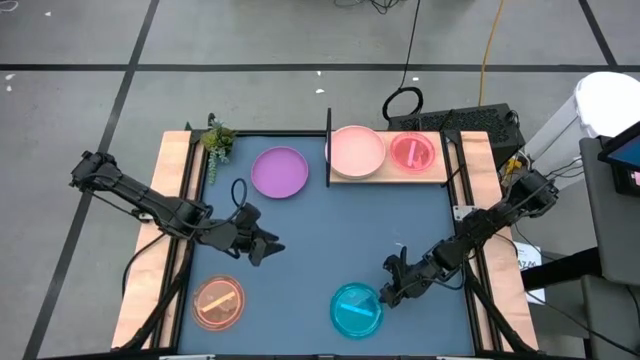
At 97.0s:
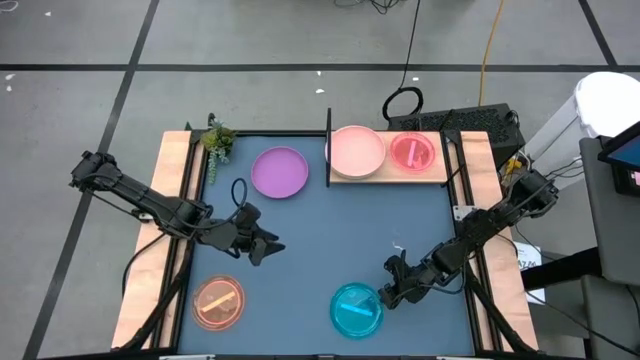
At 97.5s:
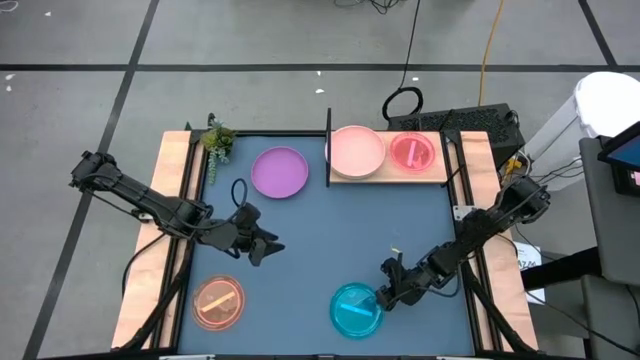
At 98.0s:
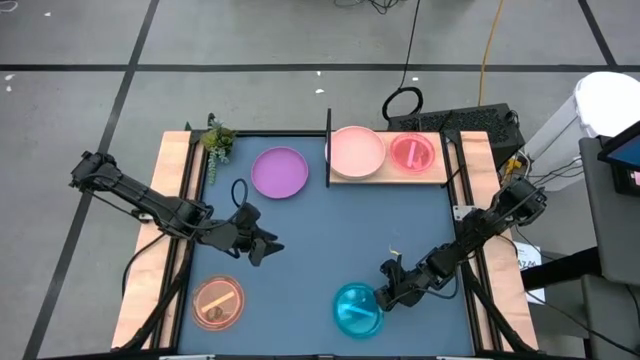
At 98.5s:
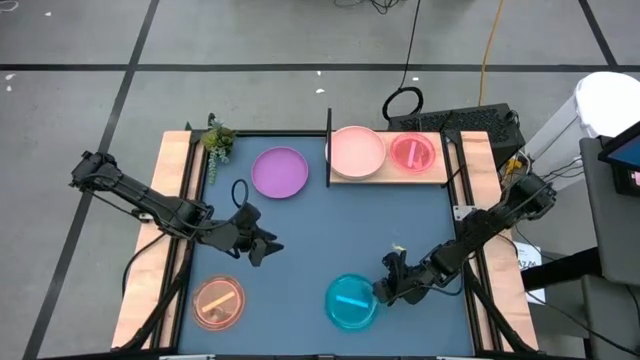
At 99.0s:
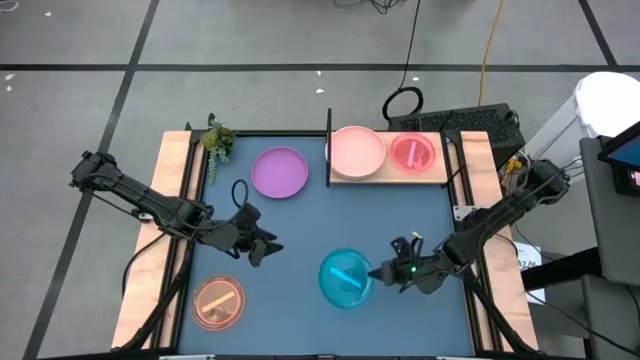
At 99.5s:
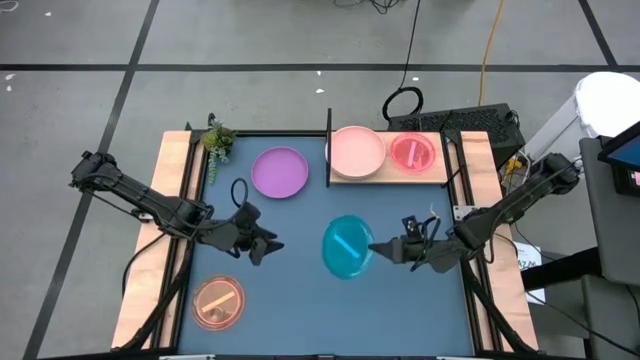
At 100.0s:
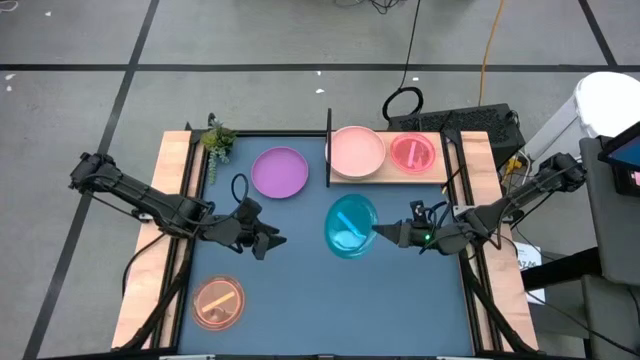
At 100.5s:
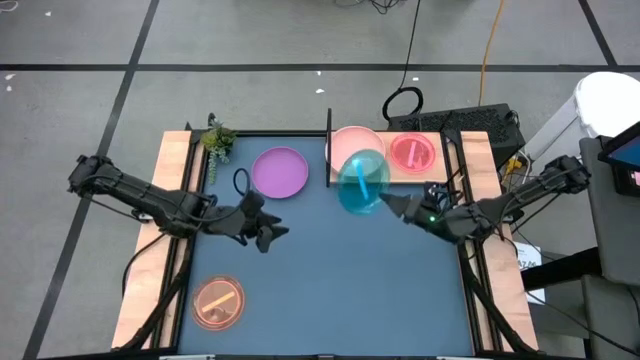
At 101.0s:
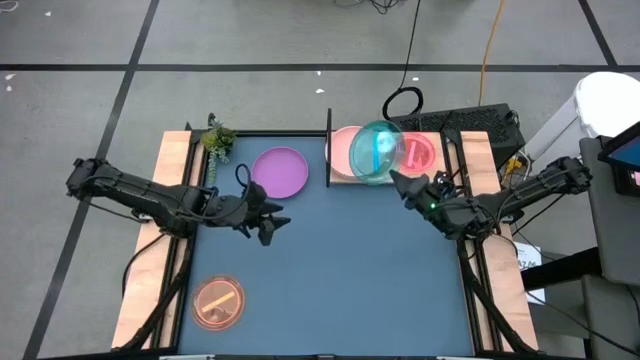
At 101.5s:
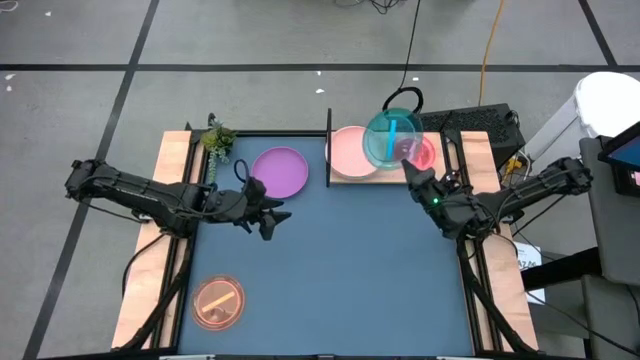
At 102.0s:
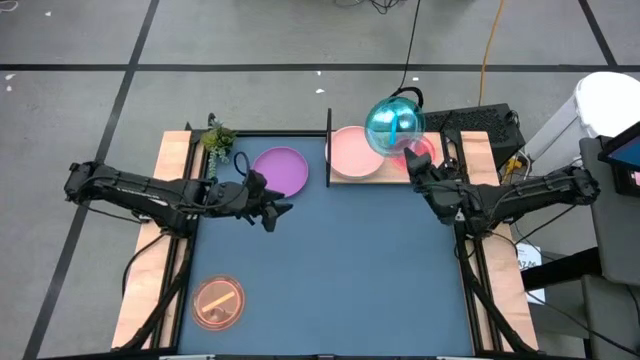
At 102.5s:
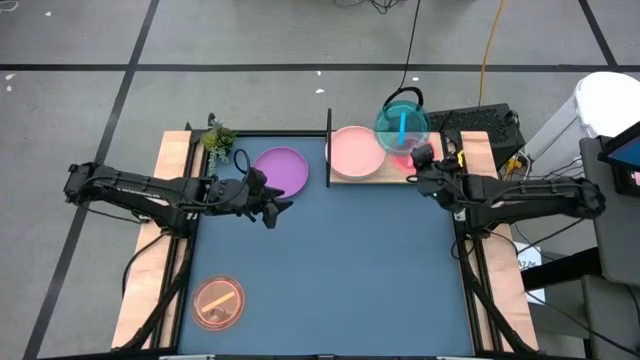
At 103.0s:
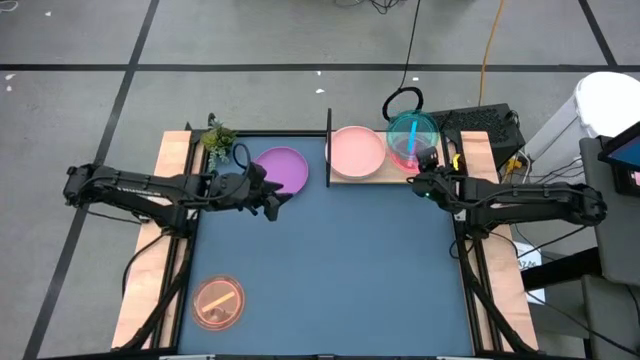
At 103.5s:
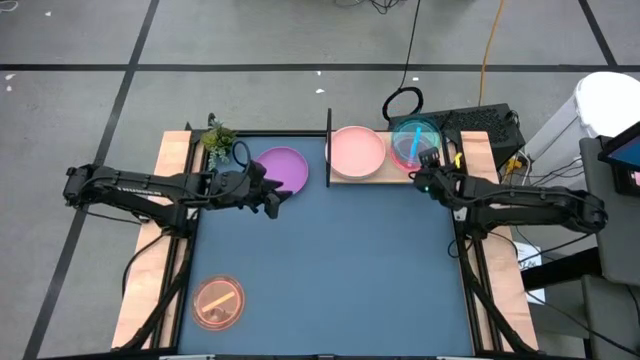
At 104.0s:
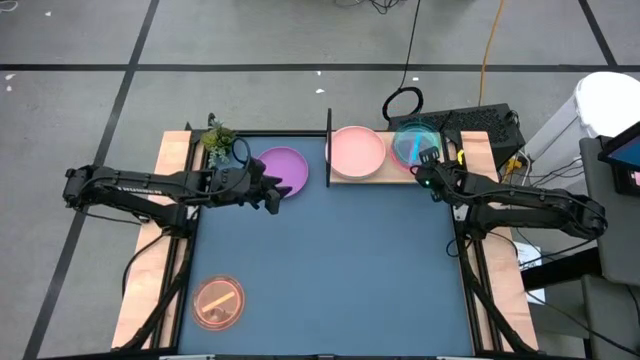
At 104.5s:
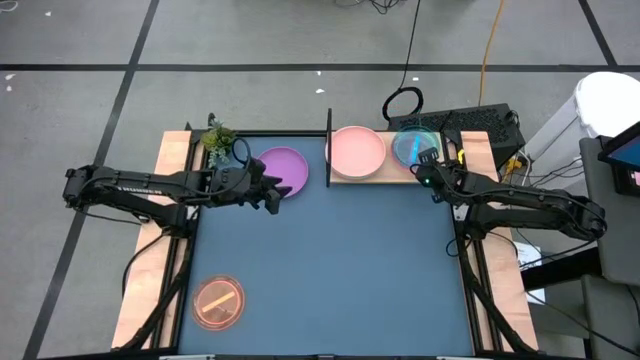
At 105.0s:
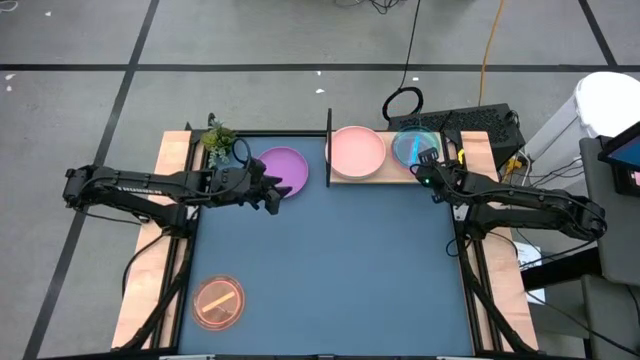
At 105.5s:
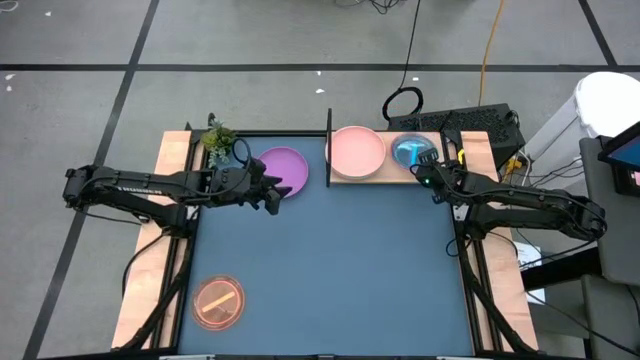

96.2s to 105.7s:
Task: Place and stack plates onto a shelf
Stack the blue plate on top of the pink plate on the shelf

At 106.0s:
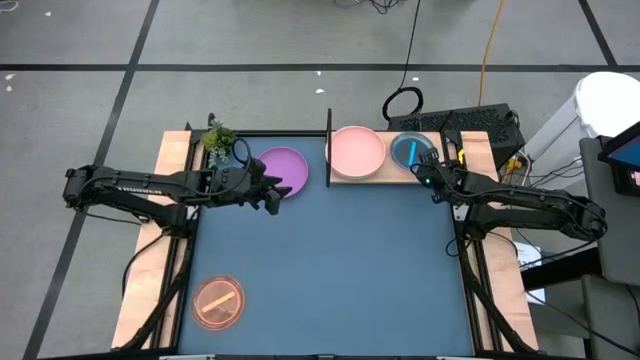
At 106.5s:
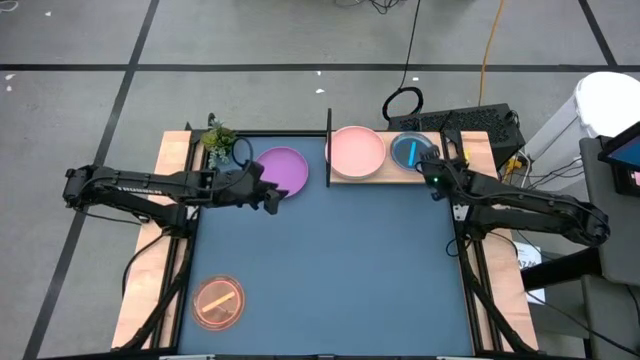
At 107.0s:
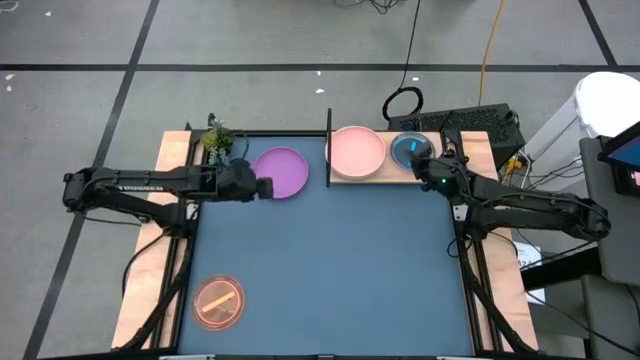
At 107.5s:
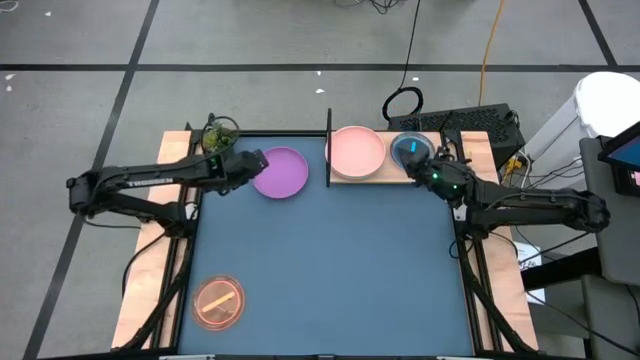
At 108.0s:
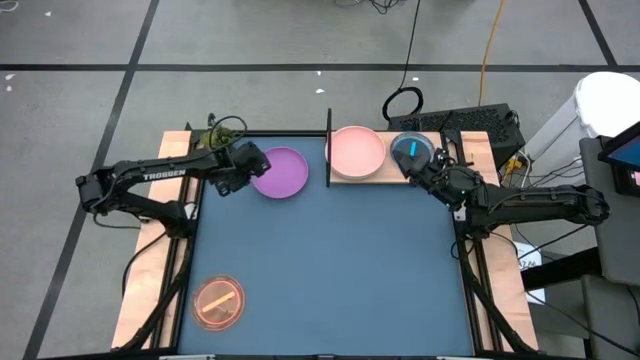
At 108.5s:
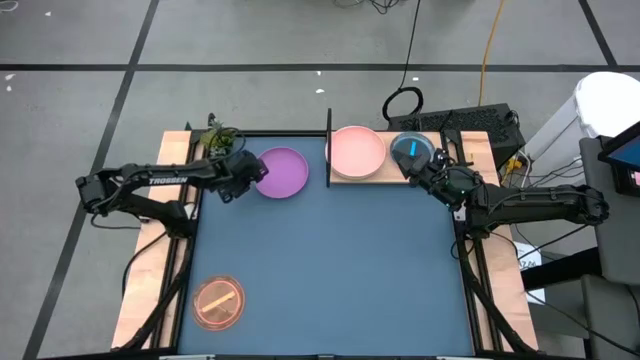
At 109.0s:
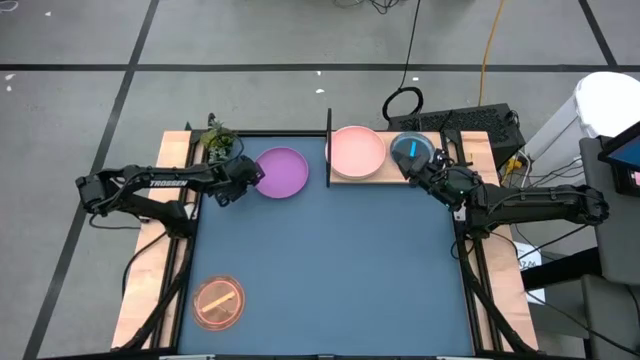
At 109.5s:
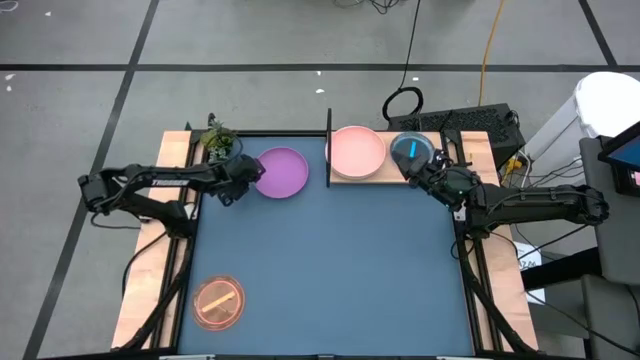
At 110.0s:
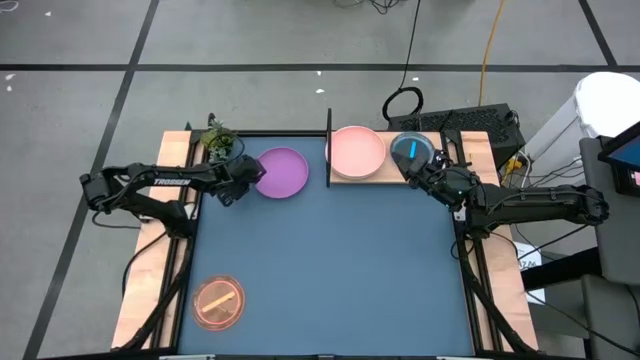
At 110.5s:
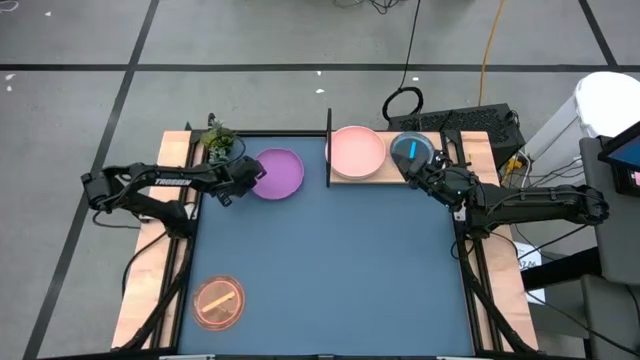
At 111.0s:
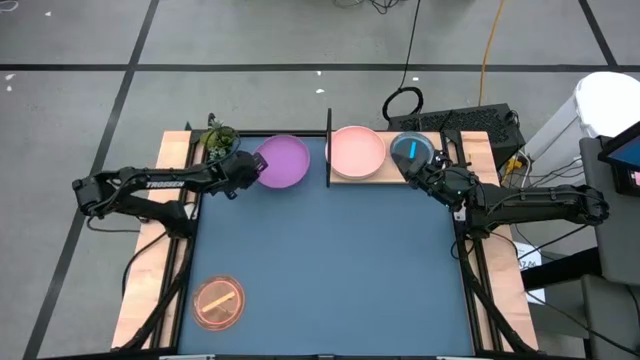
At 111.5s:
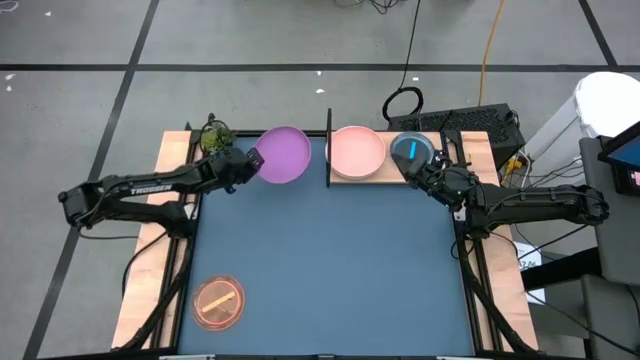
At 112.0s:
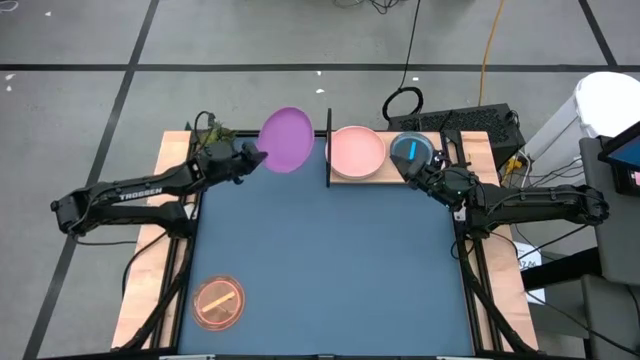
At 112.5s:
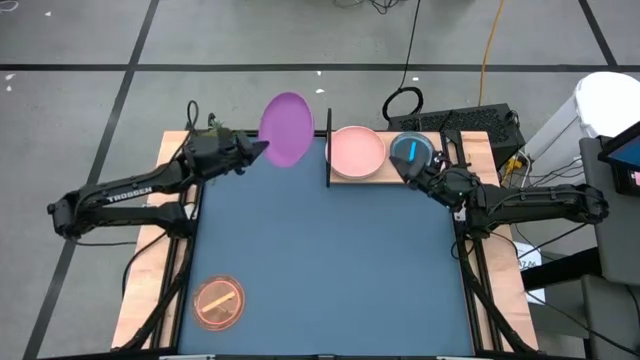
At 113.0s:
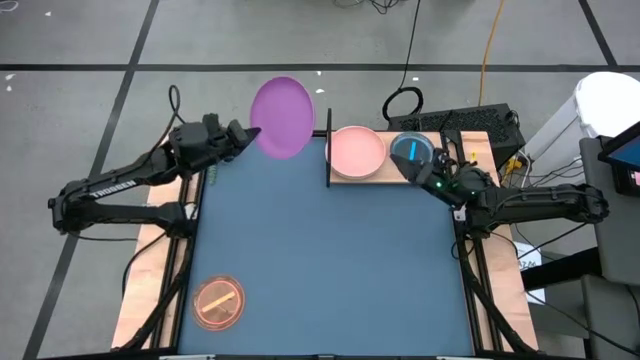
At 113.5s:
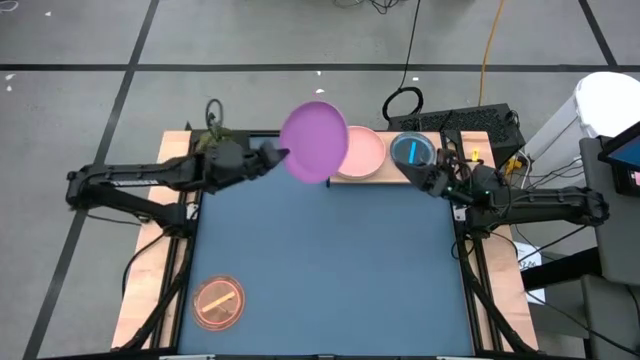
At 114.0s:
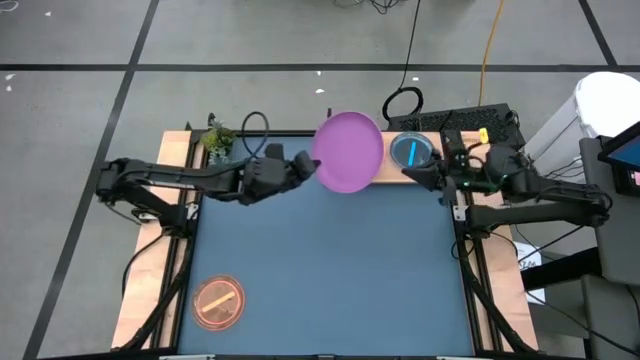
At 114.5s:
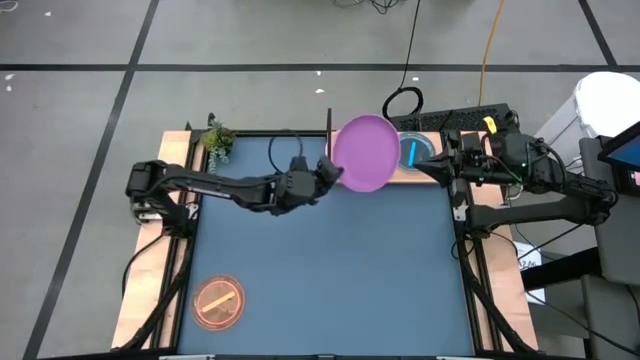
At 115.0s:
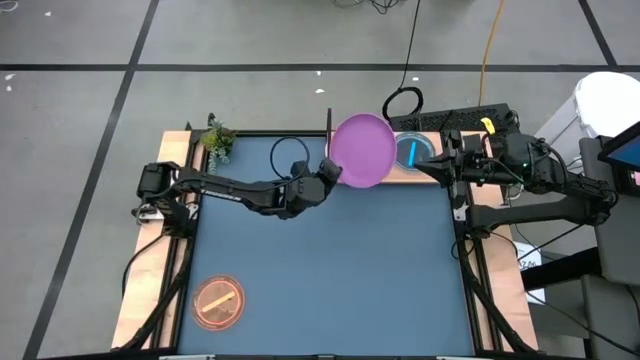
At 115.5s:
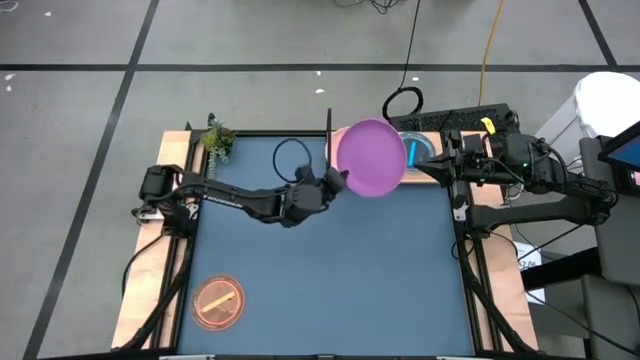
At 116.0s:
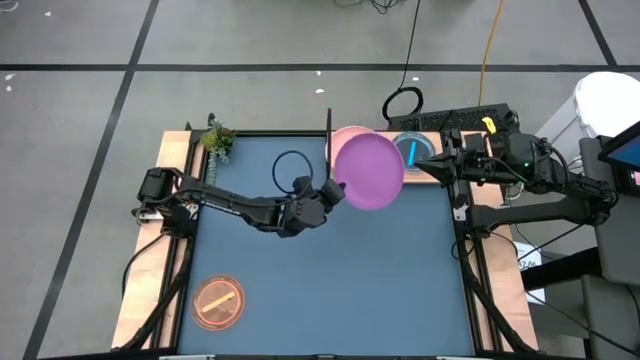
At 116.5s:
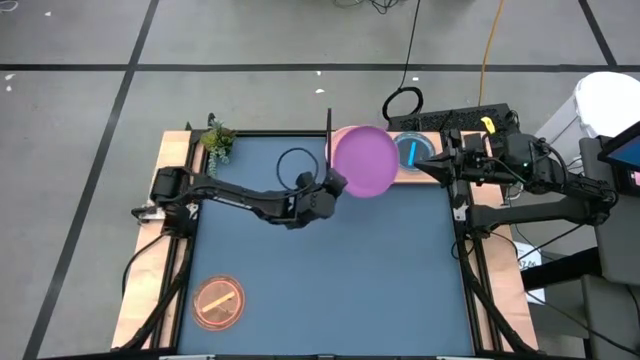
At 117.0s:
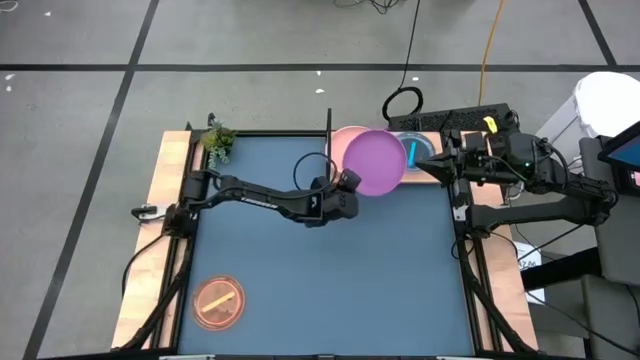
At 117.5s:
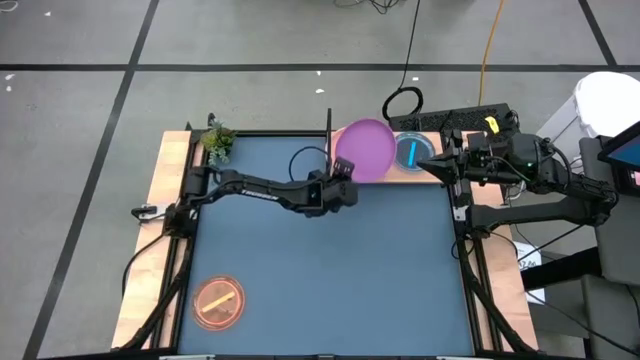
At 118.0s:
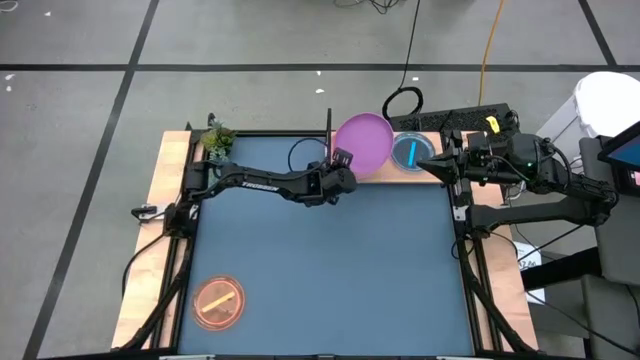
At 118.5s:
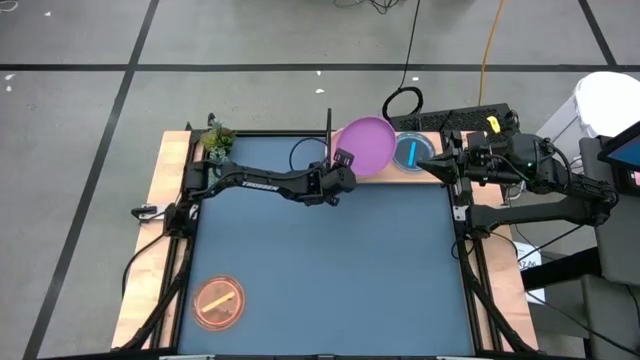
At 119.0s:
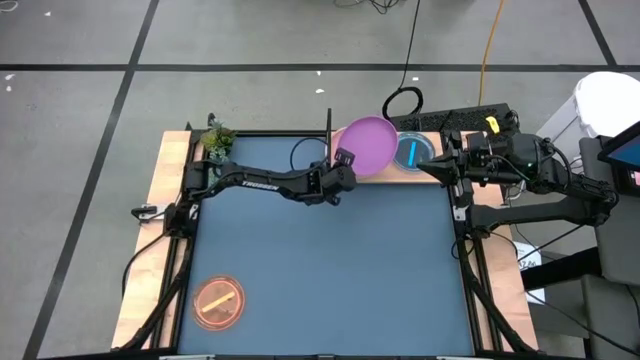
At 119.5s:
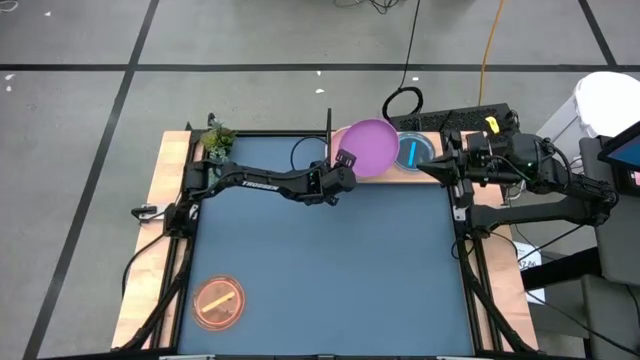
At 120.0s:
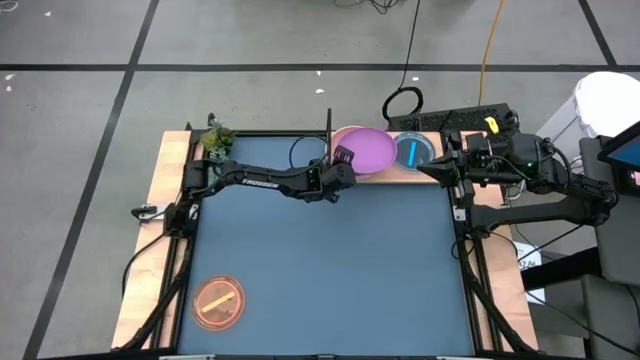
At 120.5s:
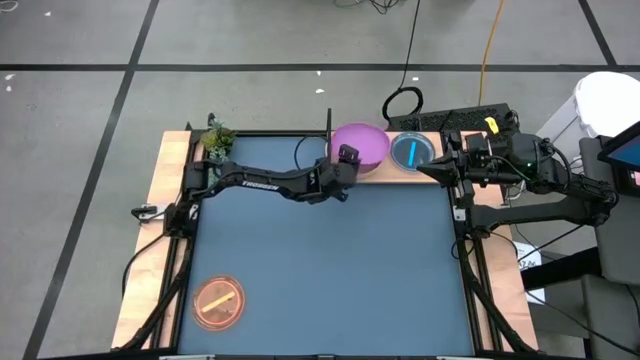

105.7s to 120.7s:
Stack the purple plate on top of the orange plate on the shelf
